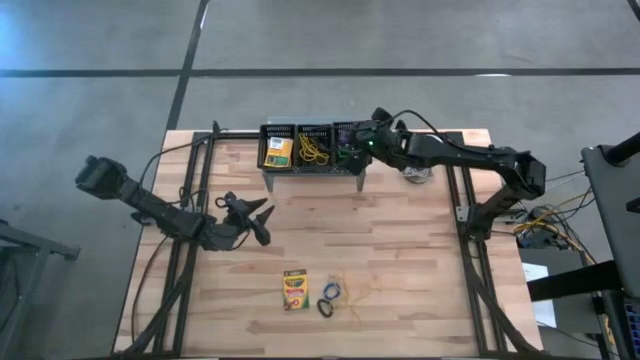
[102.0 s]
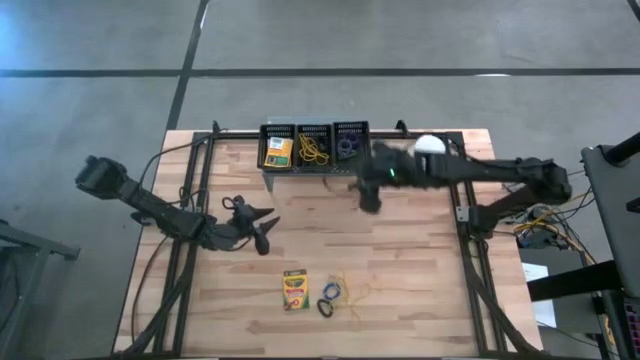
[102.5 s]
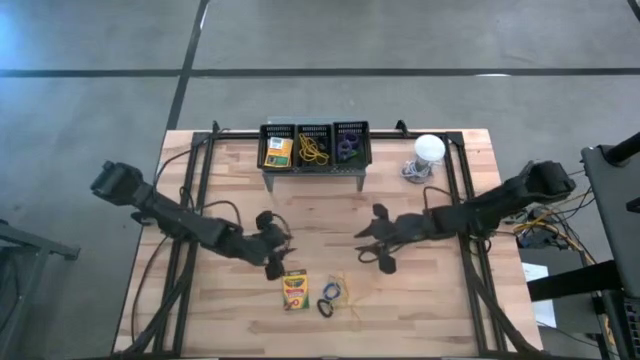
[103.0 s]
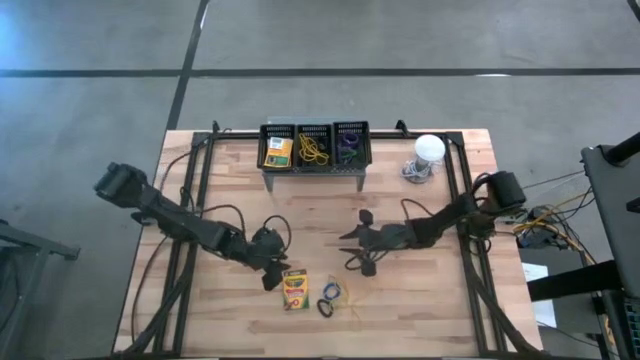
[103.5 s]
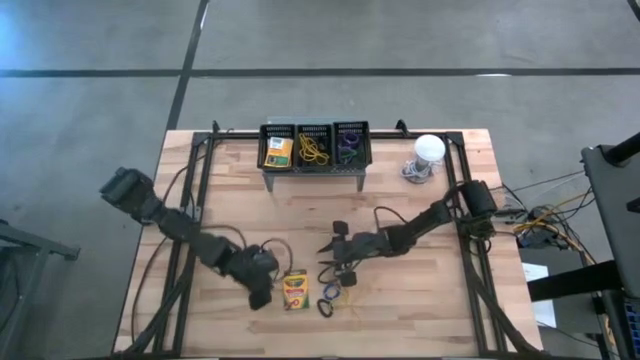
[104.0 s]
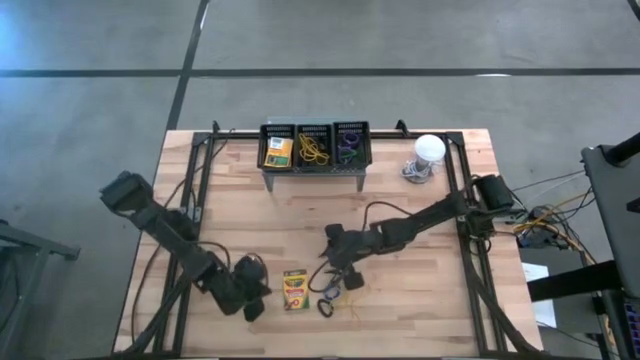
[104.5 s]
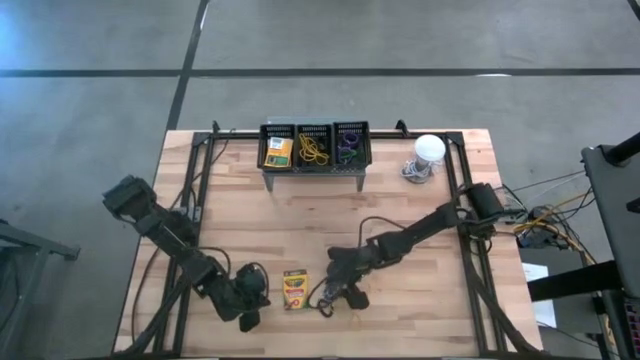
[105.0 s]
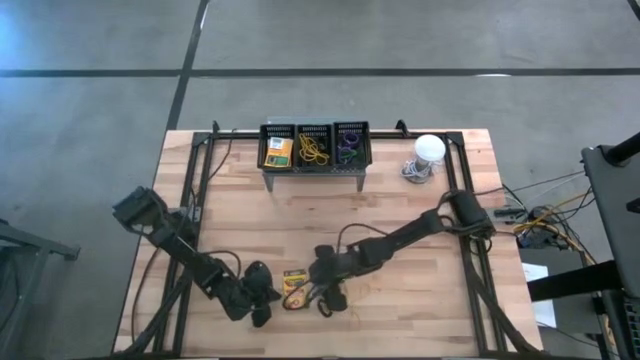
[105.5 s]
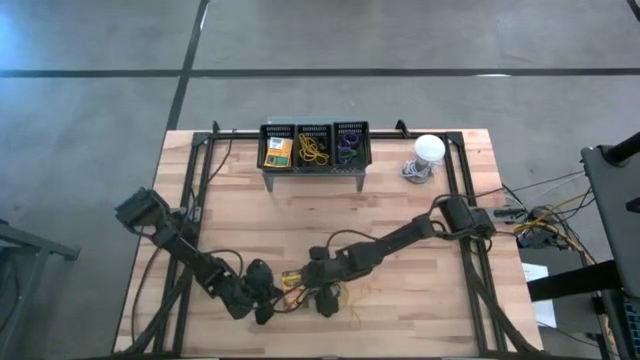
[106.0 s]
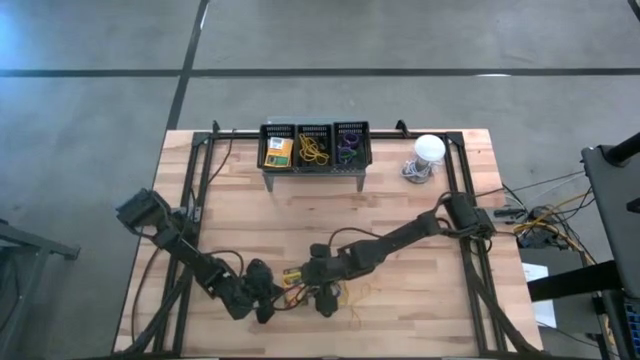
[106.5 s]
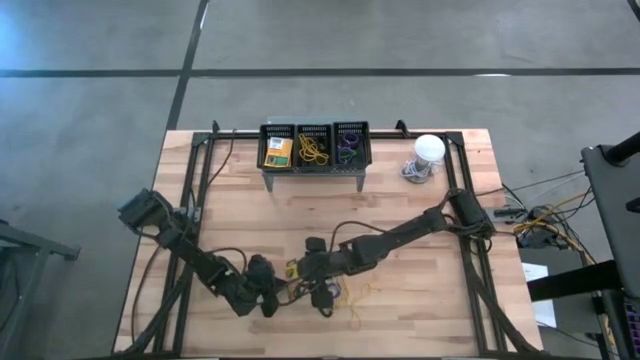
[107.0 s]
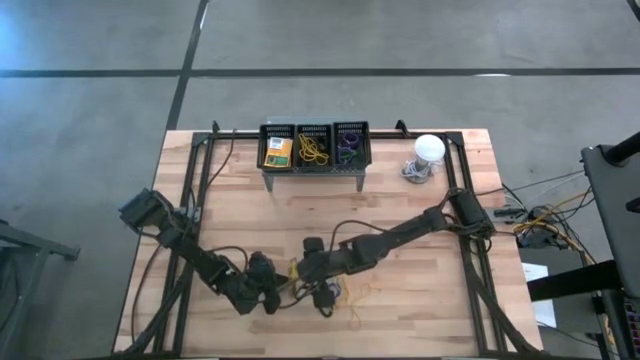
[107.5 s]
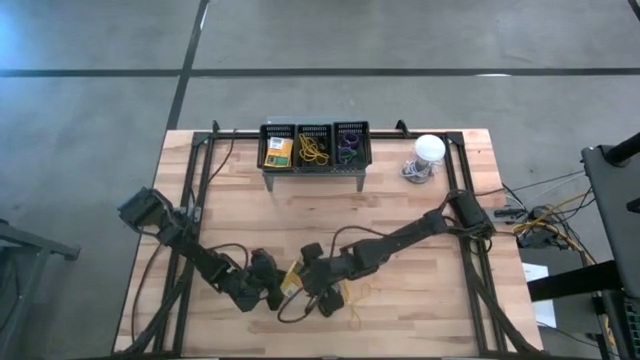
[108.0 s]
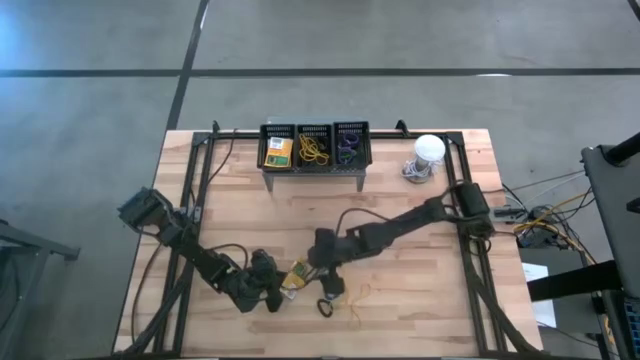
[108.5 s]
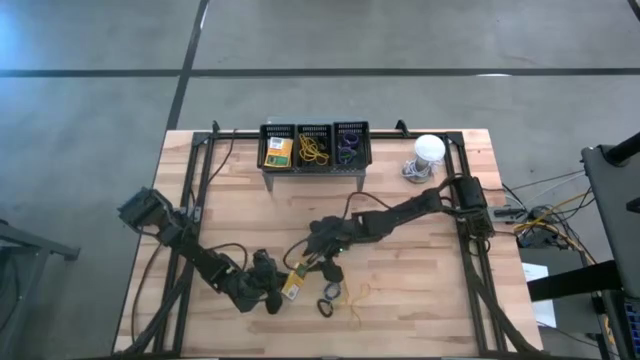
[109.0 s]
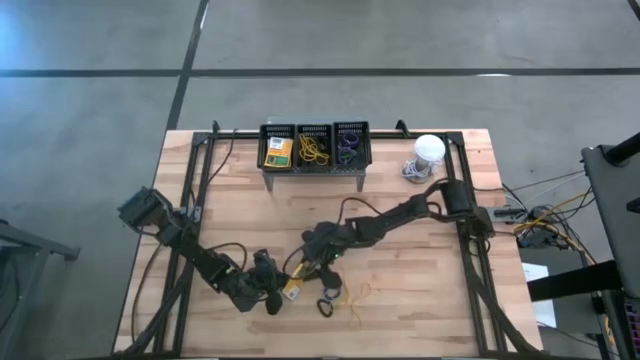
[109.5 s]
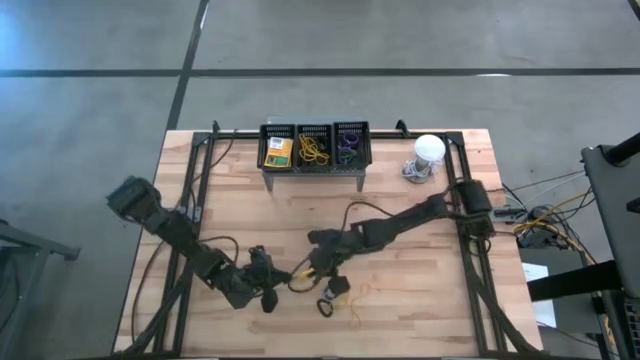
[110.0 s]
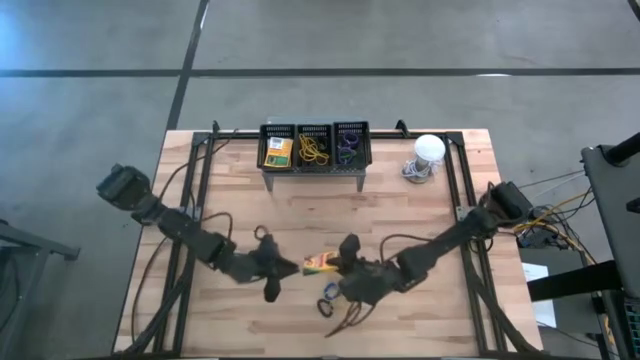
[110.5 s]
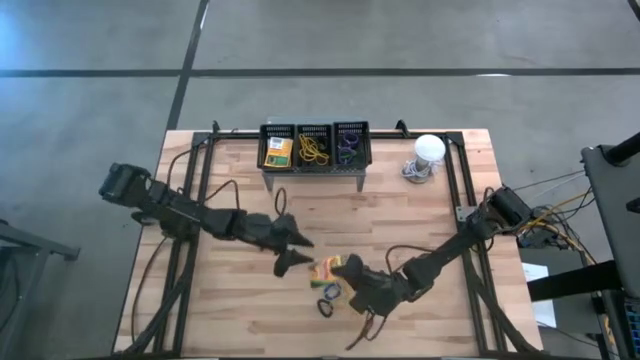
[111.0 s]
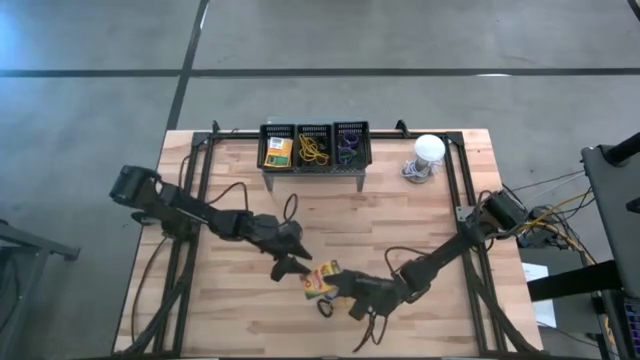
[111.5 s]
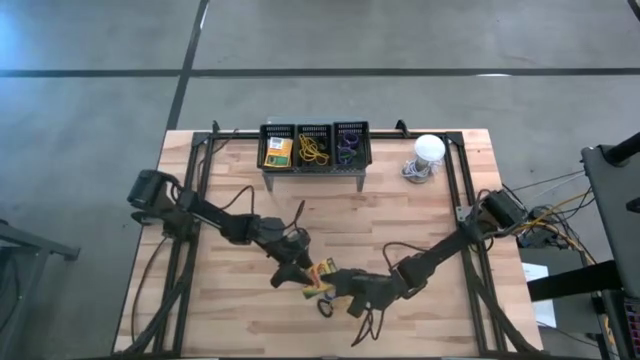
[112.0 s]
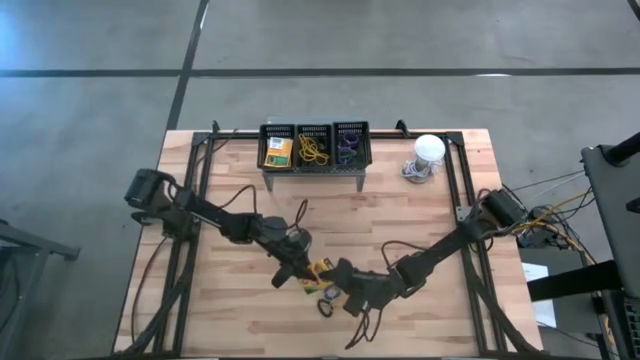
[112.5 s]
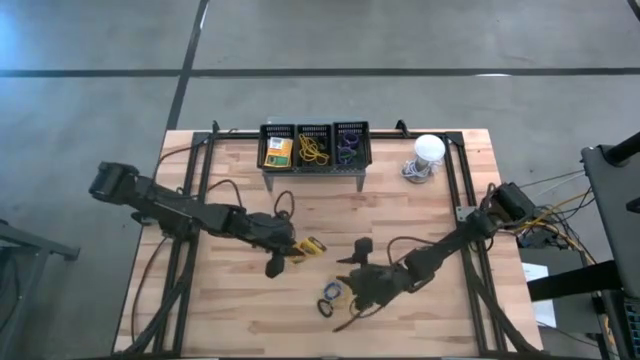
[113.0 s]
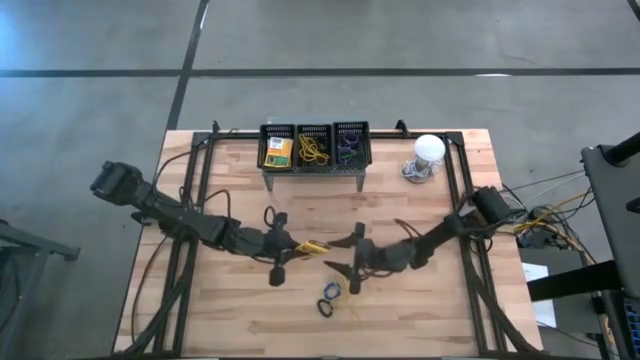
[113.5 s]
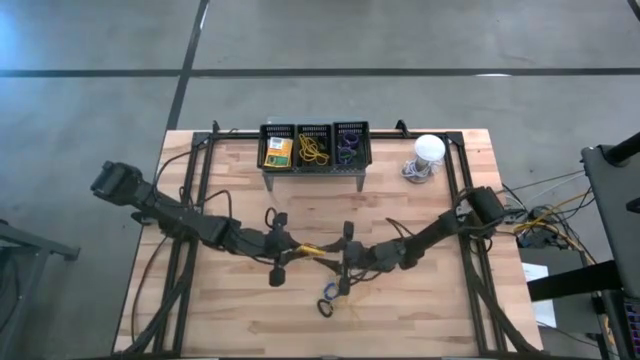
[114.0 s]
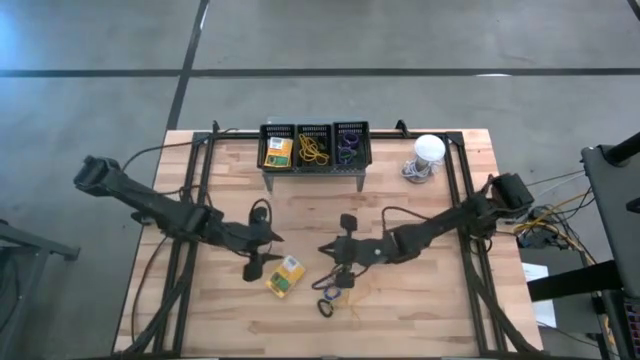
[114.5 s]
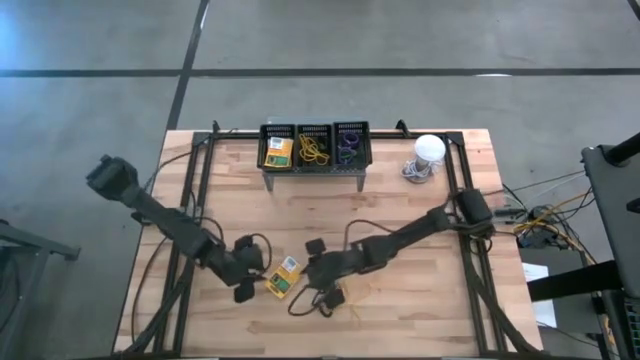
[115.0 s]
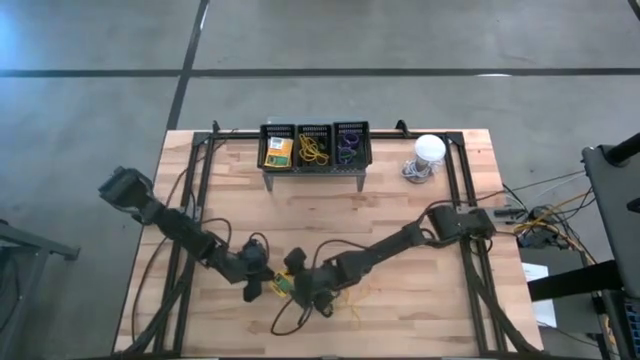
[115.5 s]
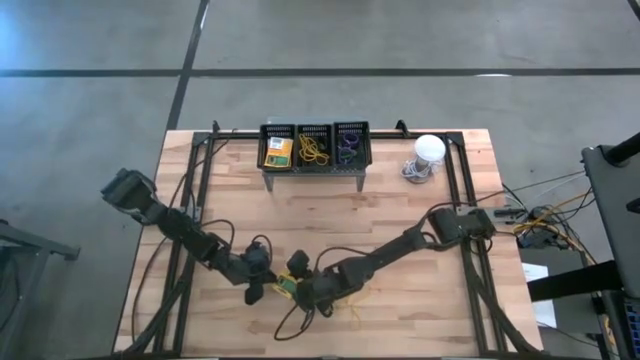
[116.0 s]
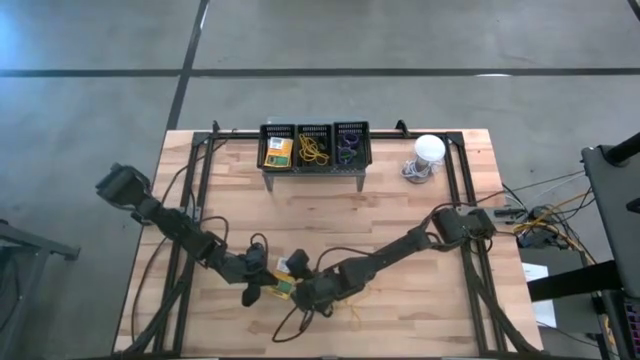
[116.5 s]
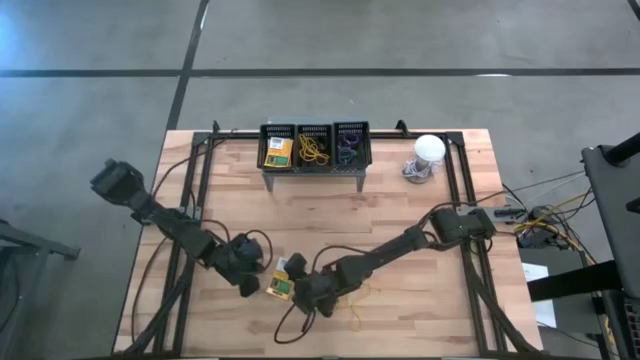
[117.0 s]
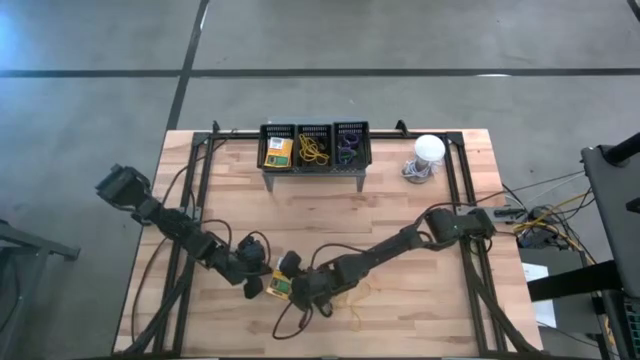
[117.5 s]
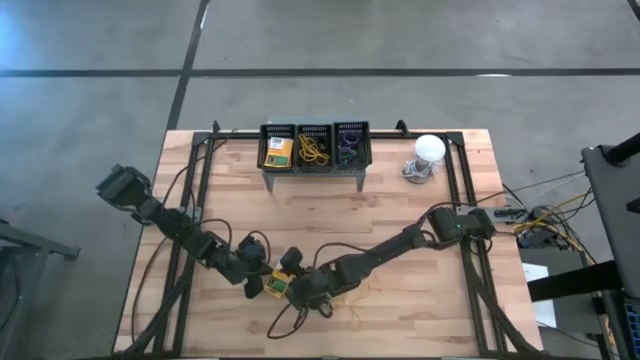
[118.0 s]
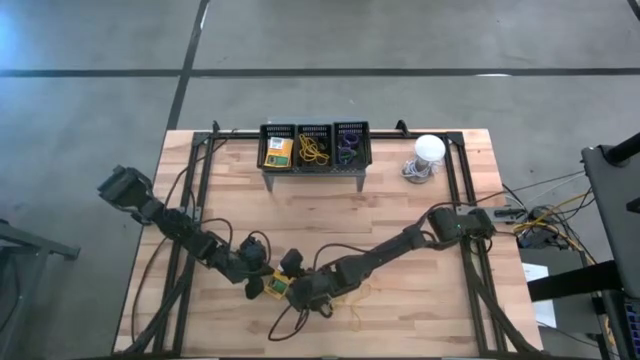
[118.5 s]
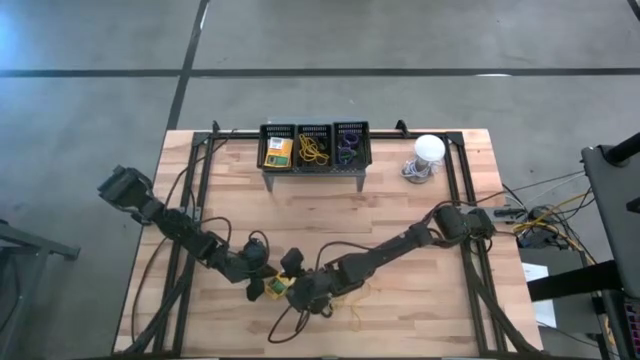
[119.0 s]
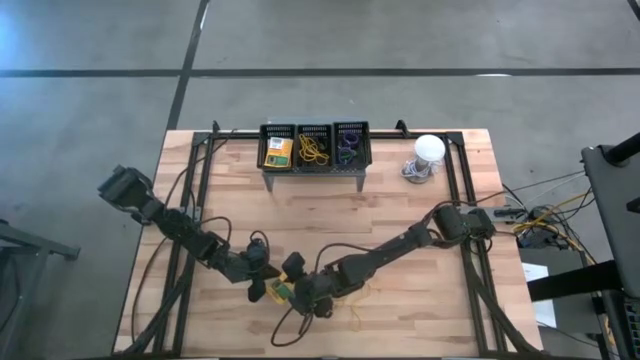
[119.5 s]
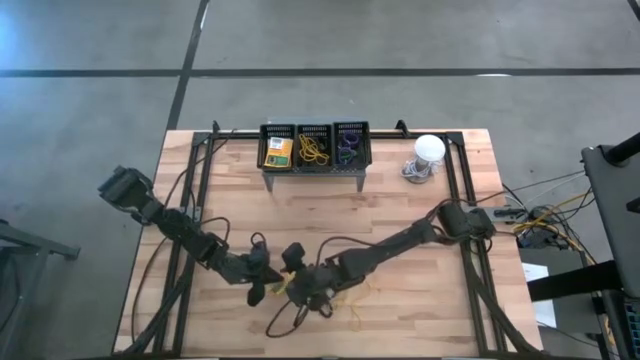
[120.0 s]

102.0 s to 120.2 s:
Task: Pick & Place Office Desk Supplies
Put the crayon box into the left black bin

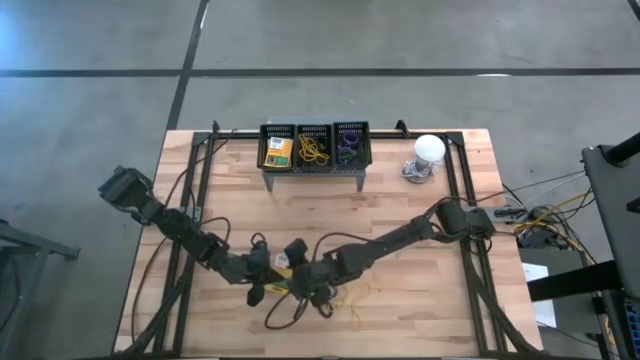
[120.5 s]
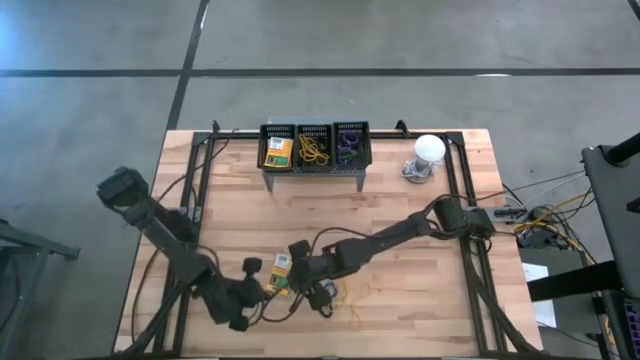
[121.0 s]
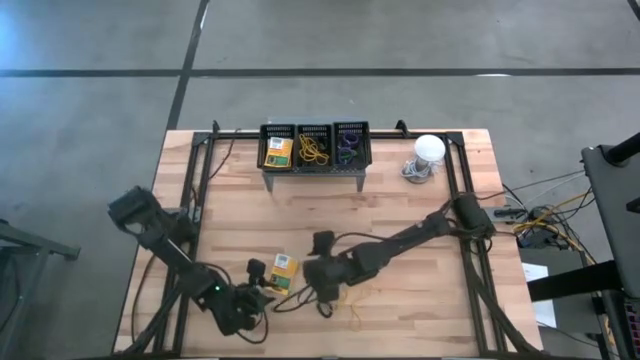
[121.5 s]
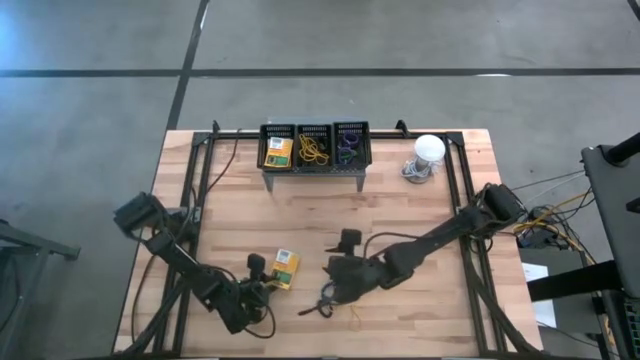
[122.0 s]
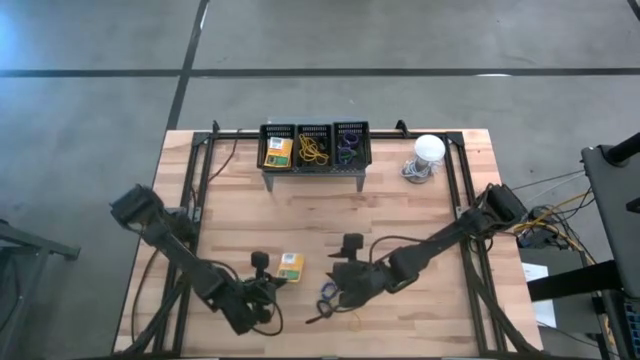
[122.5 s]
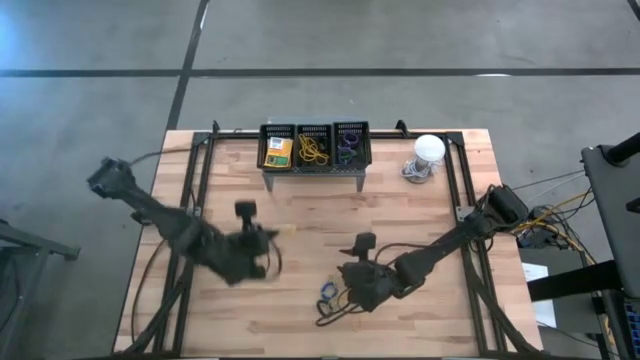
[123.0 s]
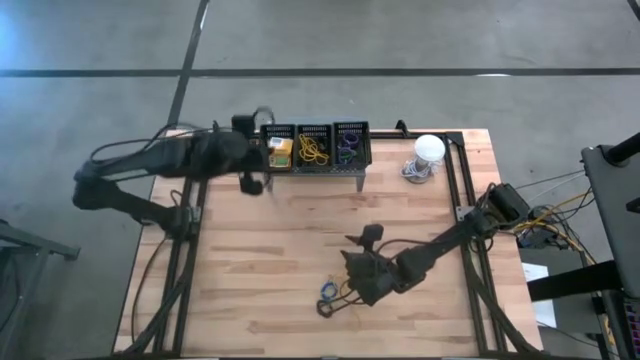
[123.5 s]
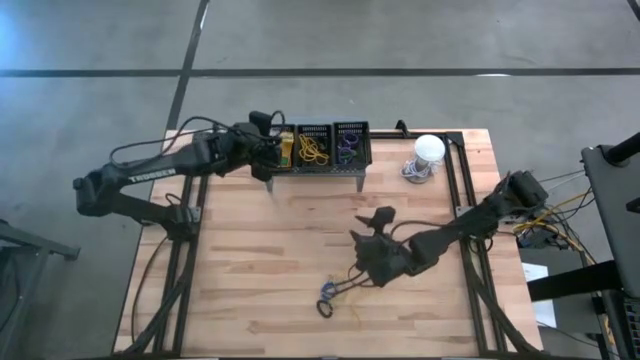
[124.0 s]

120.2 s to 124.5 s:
Put the crayon box of crayon into the left black bin
